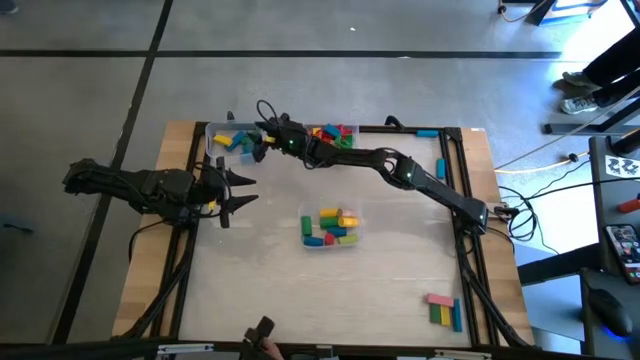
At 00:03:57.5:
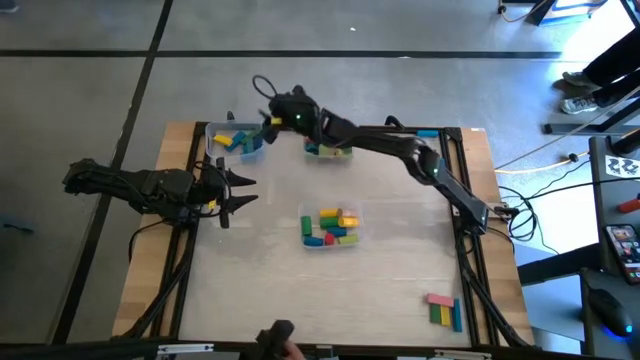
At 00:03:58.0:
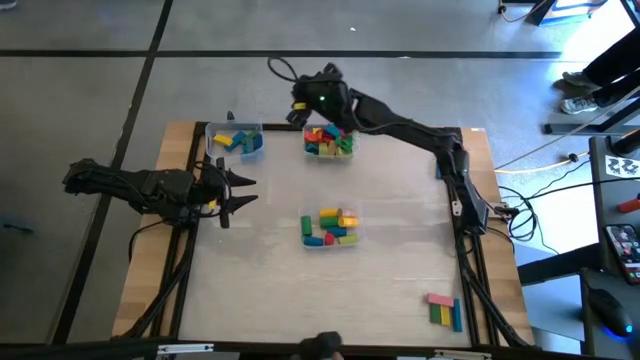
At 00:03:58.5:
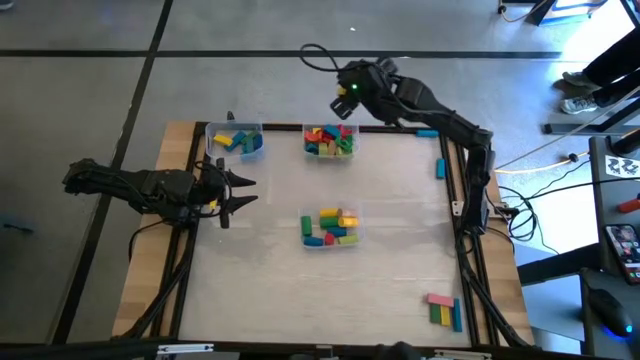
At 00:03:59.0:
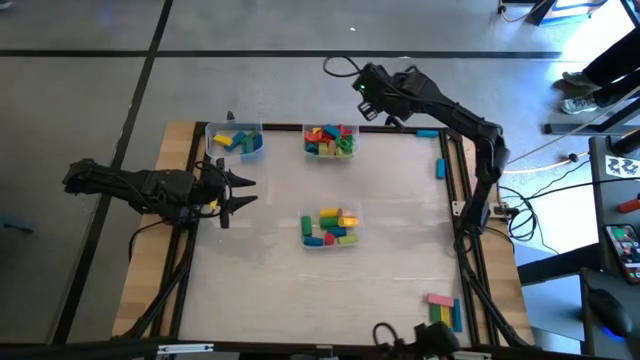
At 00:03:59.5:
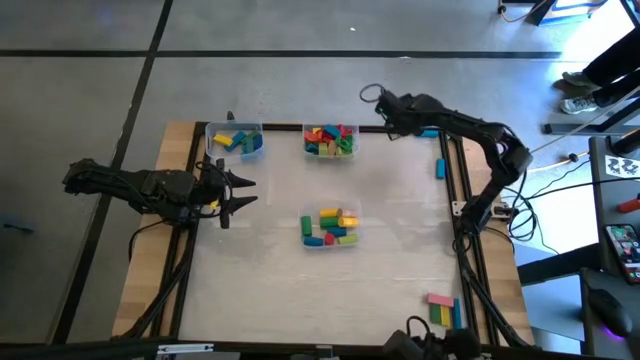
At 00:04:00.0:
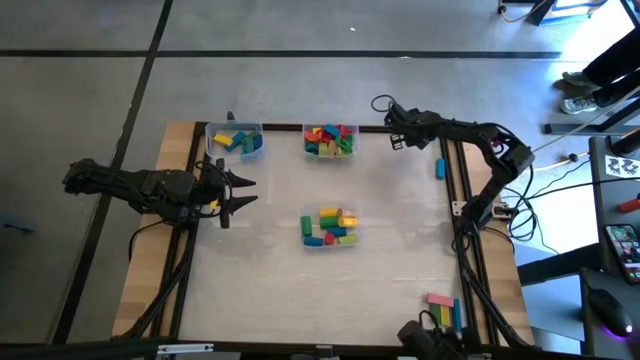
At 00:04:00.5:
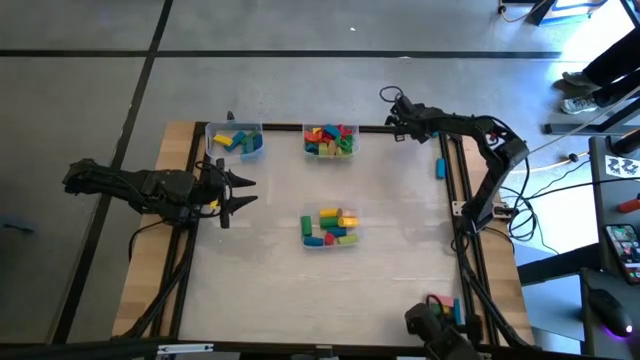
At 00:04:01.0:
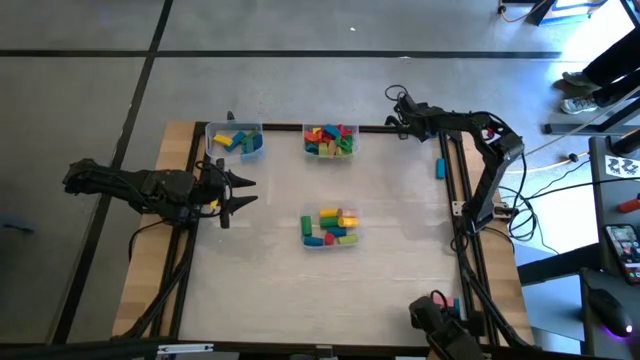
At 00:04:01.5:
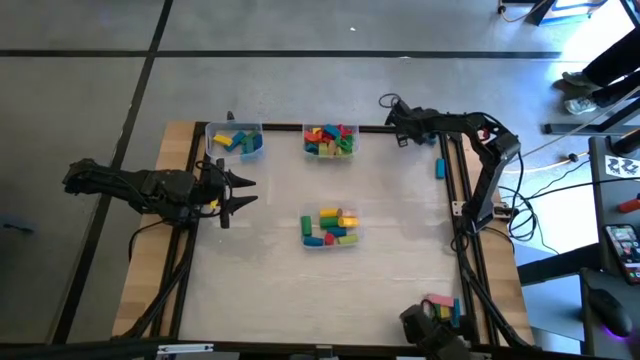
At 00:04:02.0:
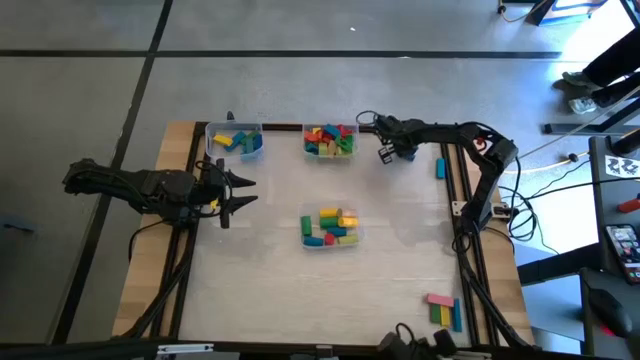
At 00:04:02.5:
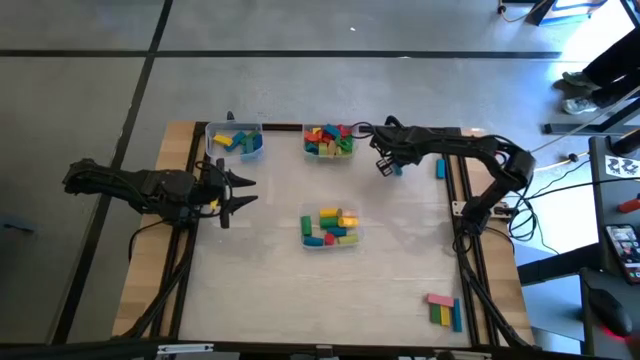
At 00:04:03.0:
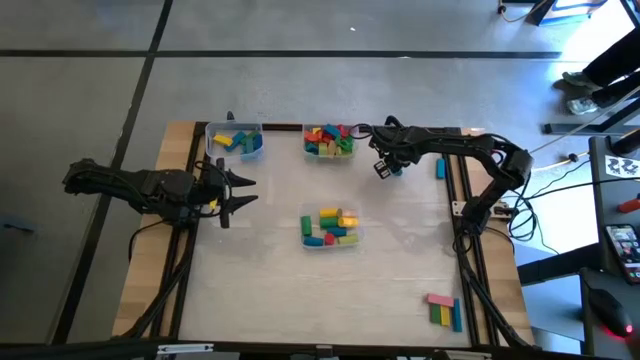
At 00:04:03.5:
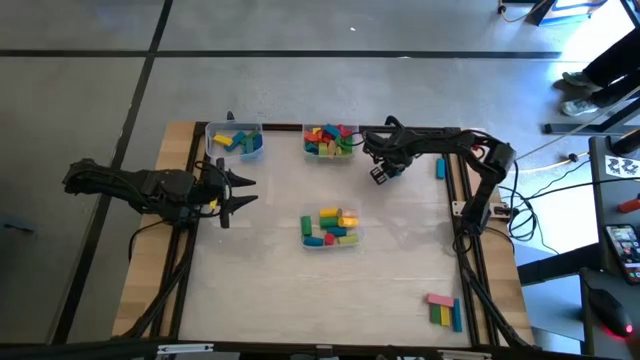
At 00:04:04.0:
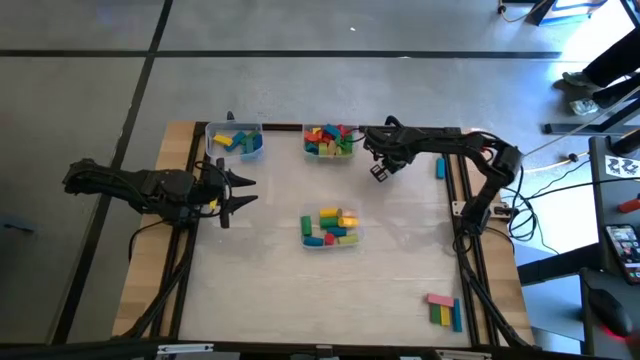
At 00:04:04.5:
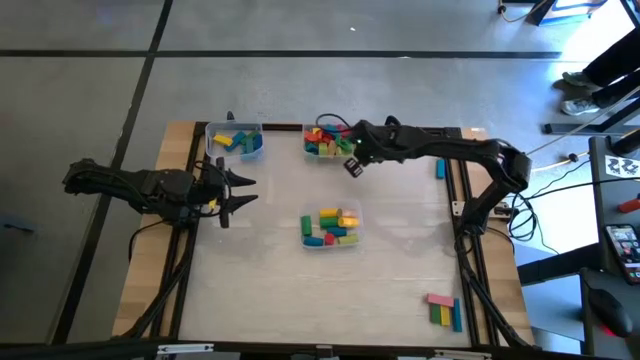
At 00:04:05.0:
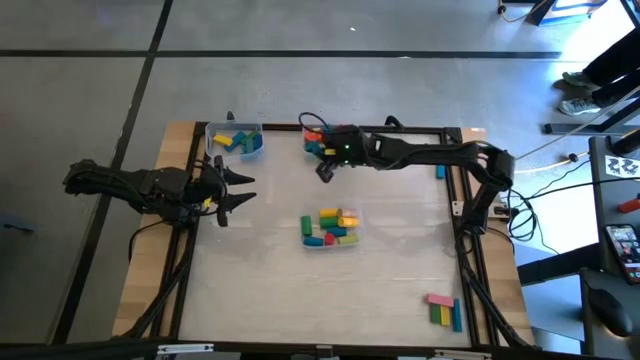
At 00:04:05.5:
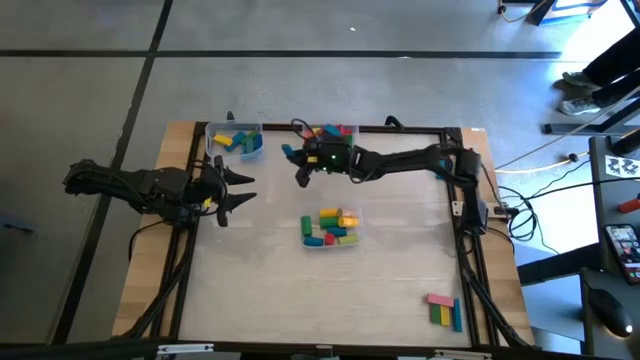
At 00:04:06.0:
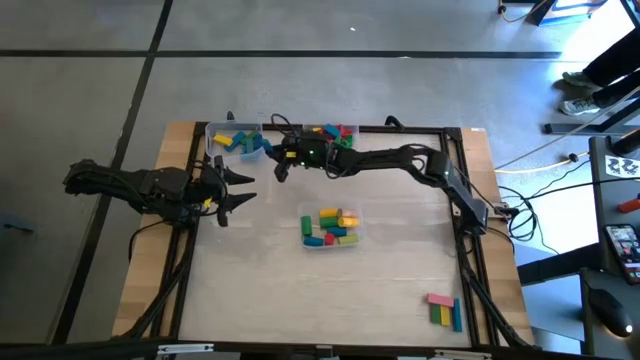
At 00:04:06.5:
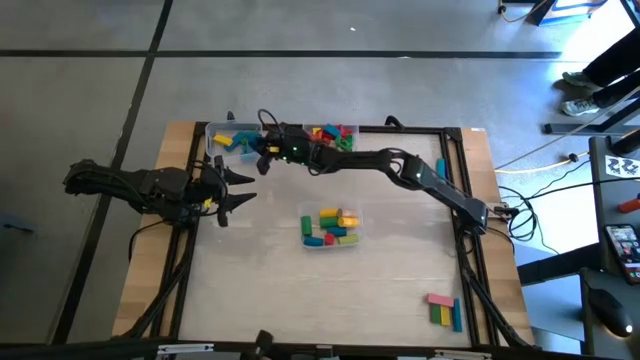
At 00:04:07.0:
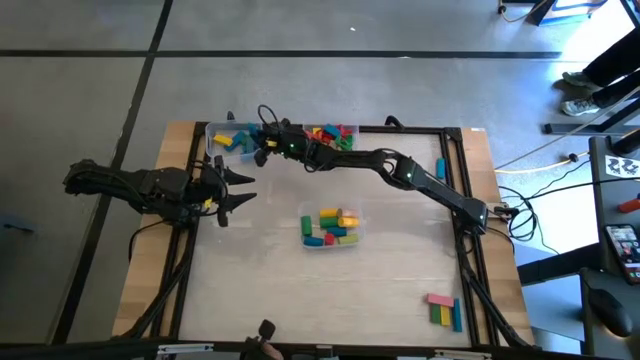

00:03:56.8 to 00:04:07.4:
Task: Sort blocks by size
Put the light blue rectangular block into the top left transparent bin

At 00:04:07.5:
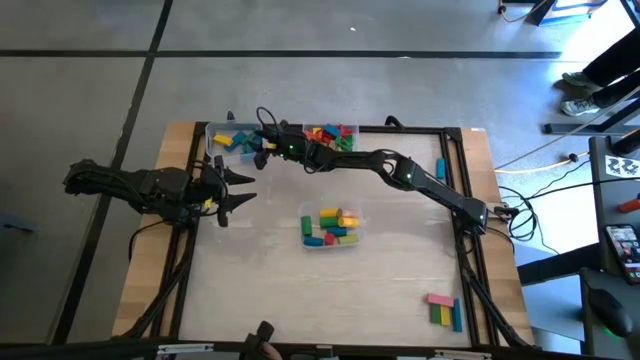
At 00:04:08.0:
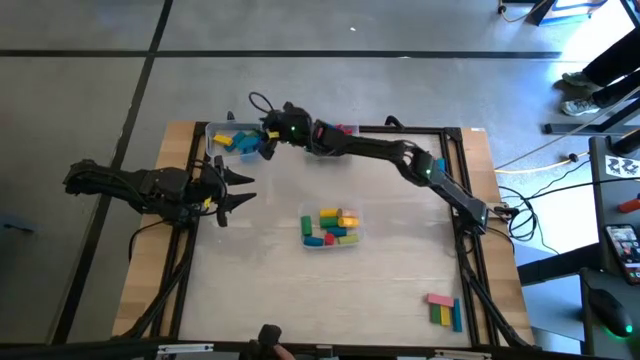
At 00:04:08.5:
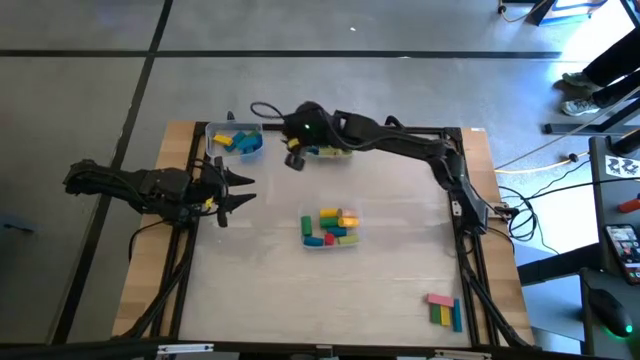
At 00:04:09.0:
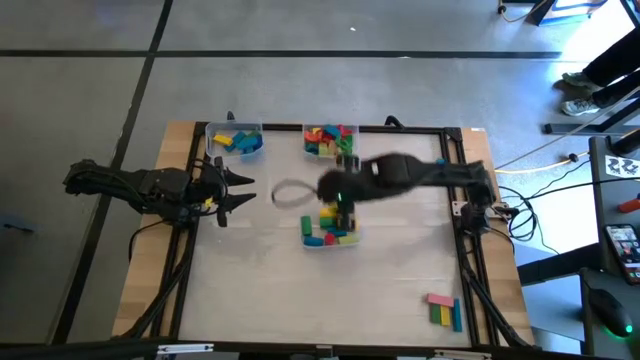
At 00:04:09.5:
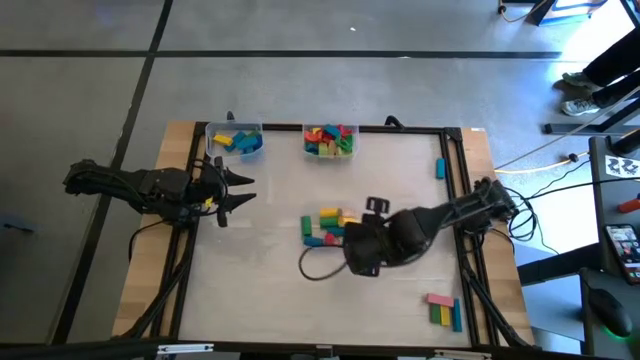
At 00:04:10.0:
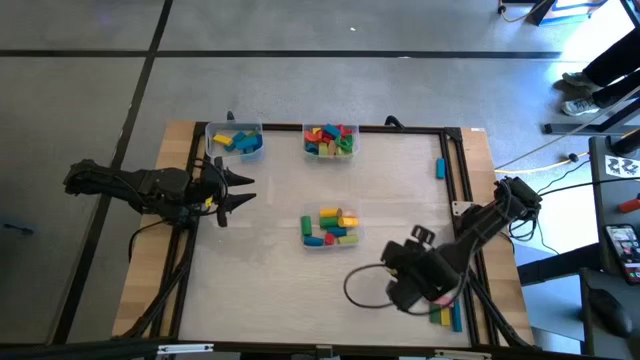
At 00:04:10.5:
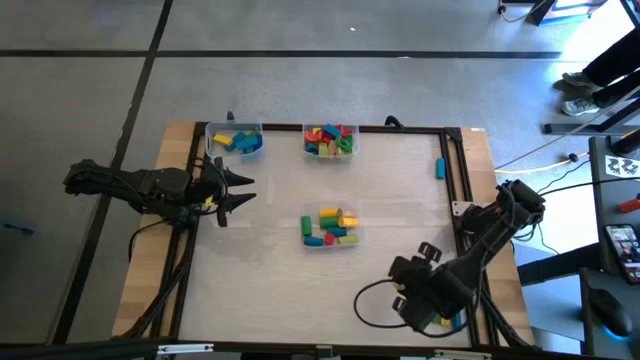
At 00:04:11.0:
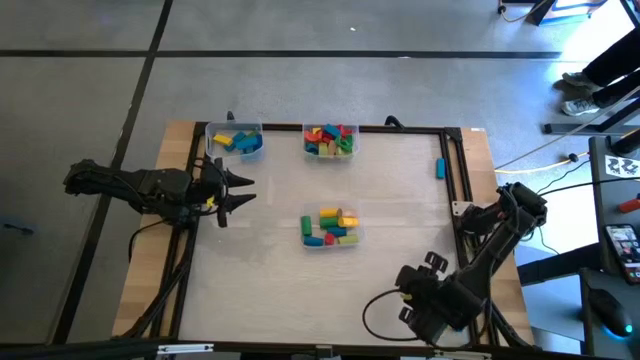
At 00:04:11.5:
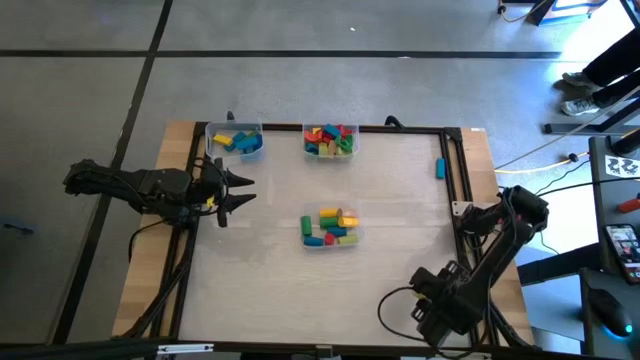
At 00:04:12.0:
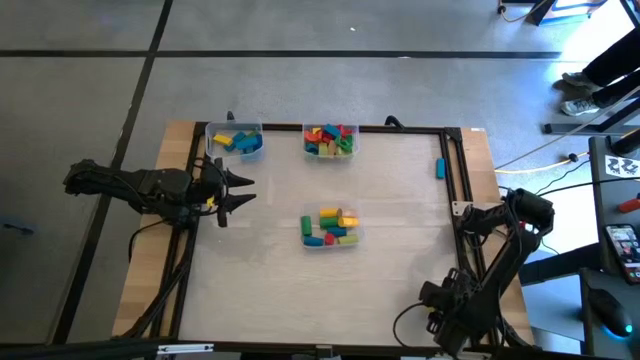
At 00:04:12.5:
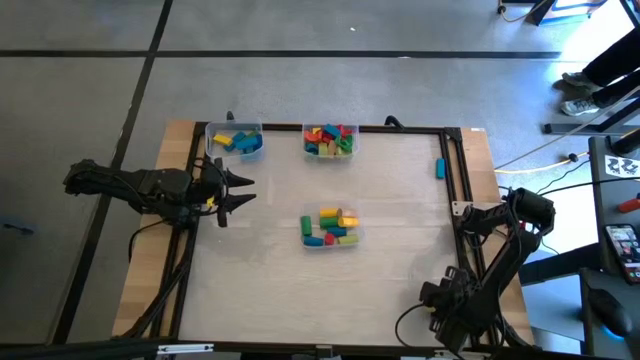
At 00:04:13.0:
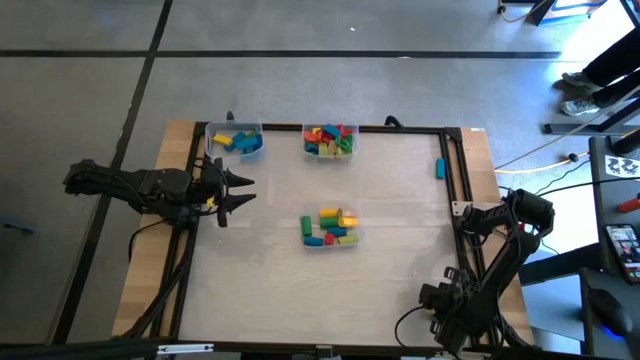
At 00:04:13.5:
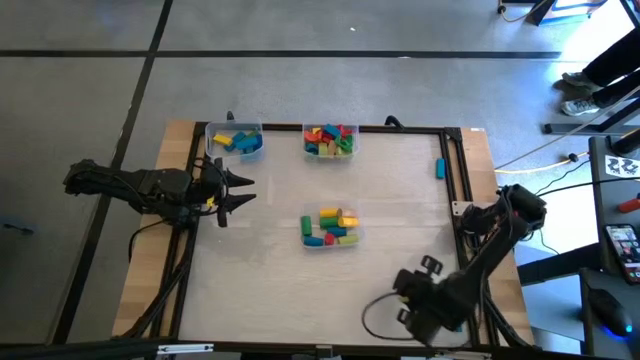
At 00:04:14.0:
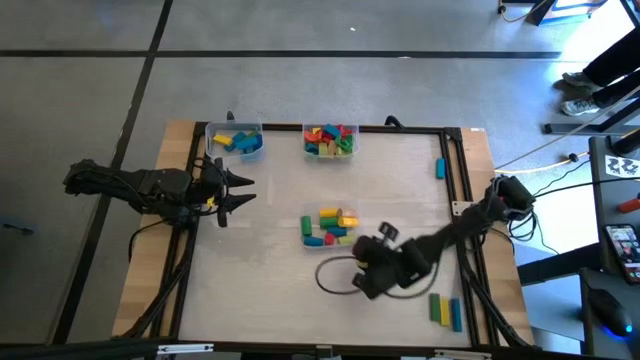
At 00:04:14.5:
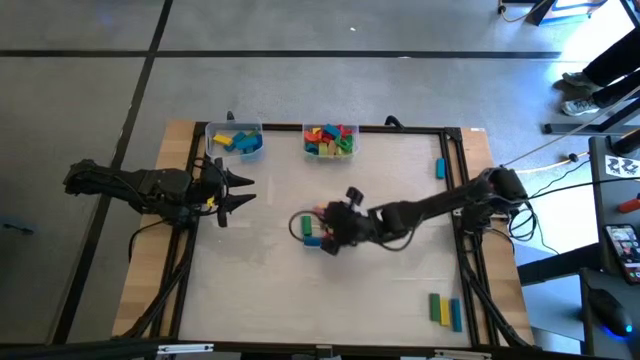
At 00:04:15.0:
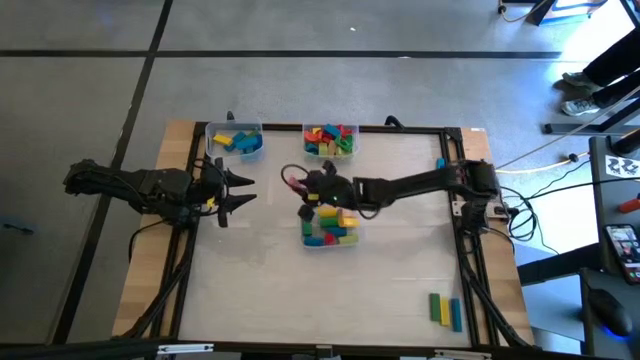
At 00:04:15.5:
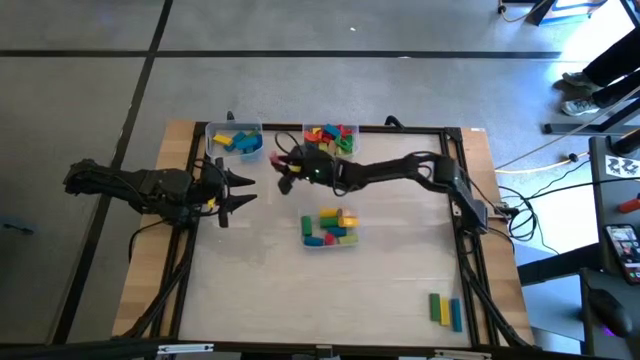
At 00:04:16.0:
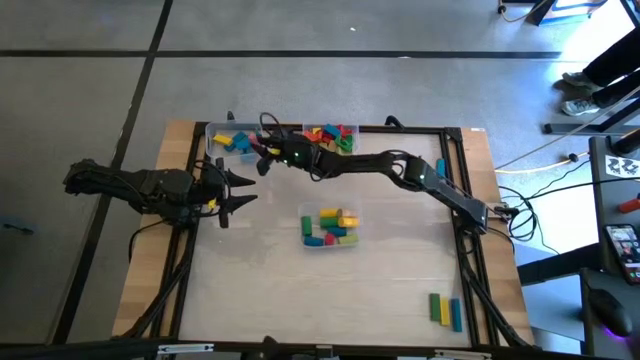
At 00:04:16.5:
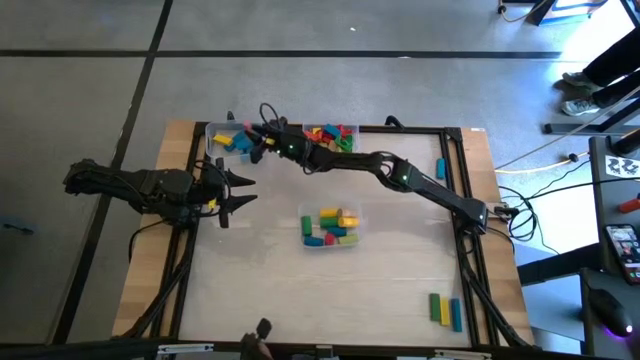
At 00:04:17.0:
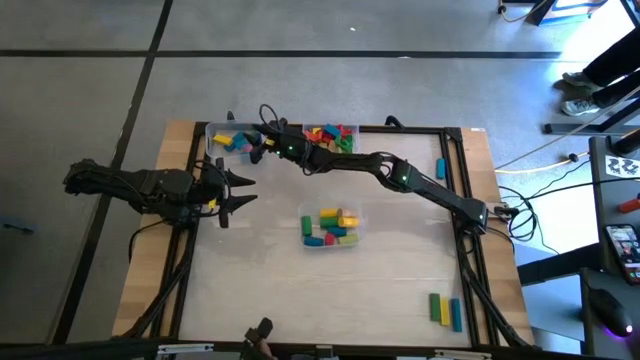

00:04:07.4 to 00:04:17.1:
Put the pink rectangular block into the top left transparent bin
